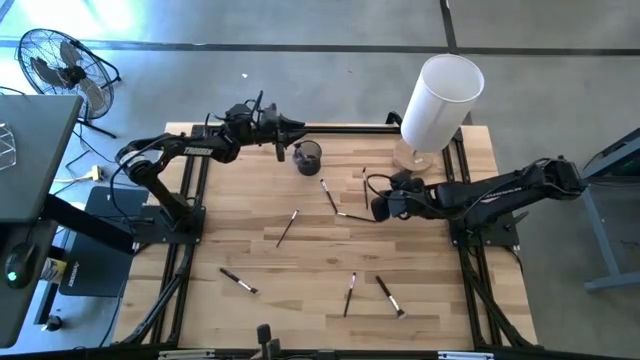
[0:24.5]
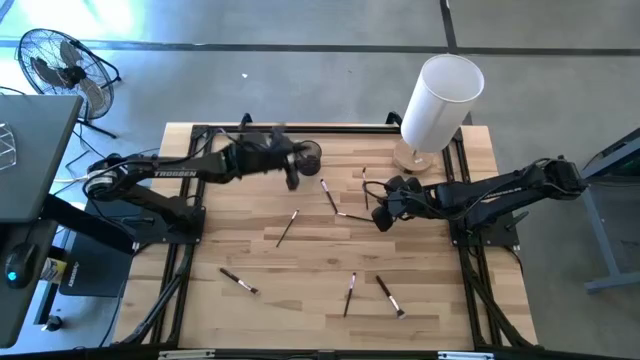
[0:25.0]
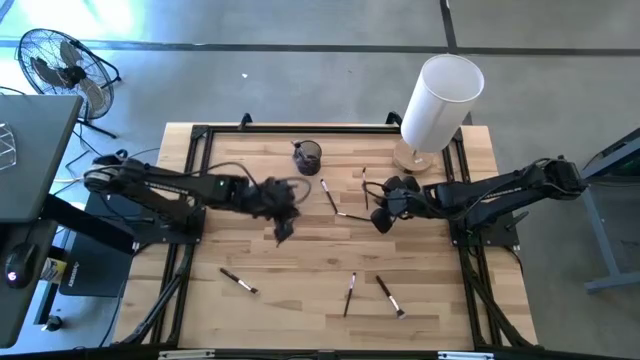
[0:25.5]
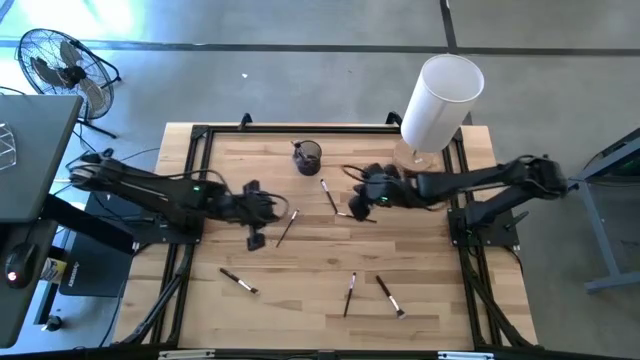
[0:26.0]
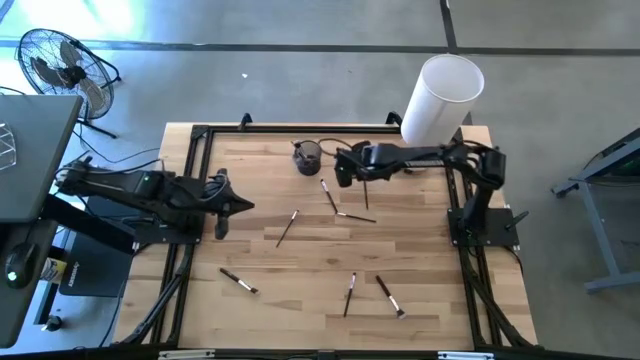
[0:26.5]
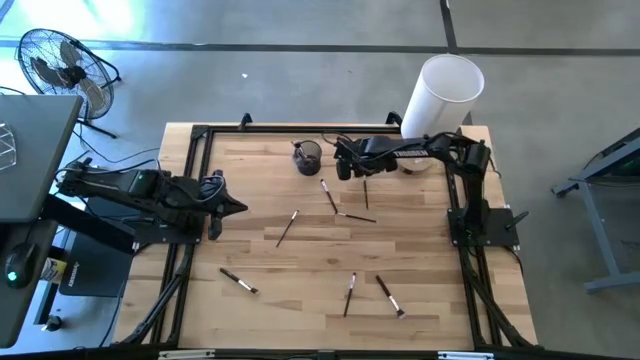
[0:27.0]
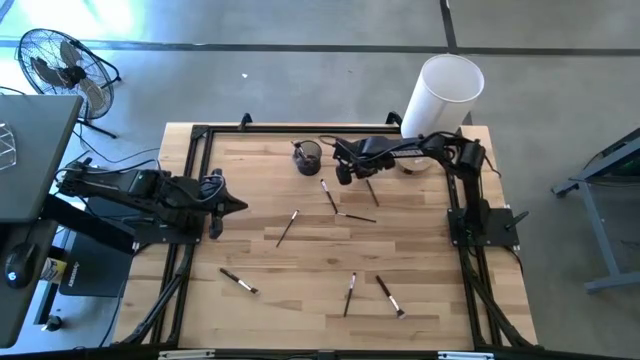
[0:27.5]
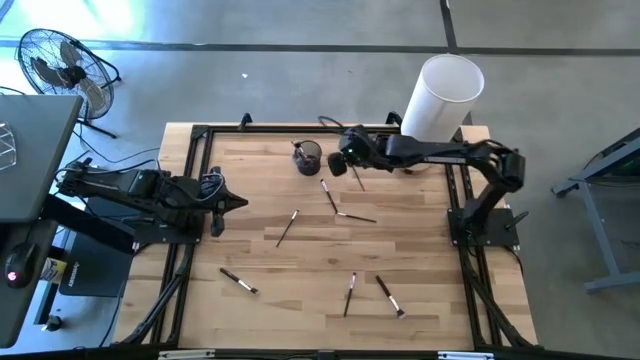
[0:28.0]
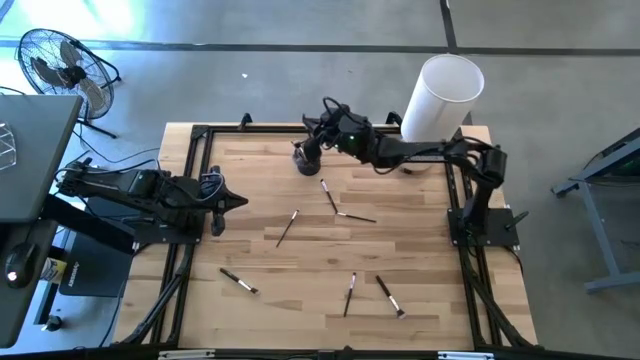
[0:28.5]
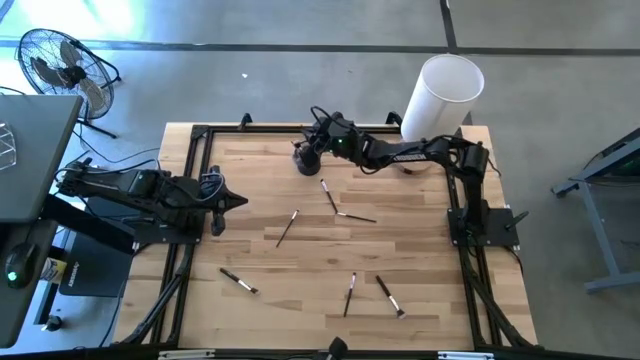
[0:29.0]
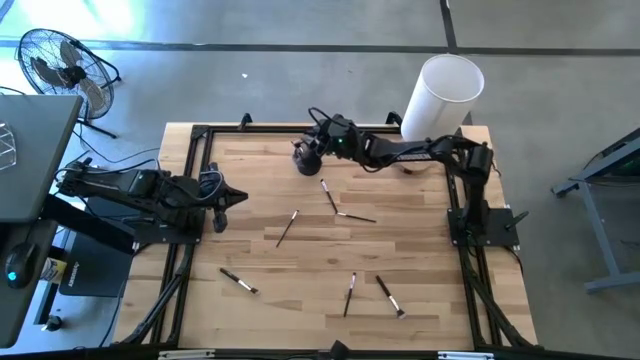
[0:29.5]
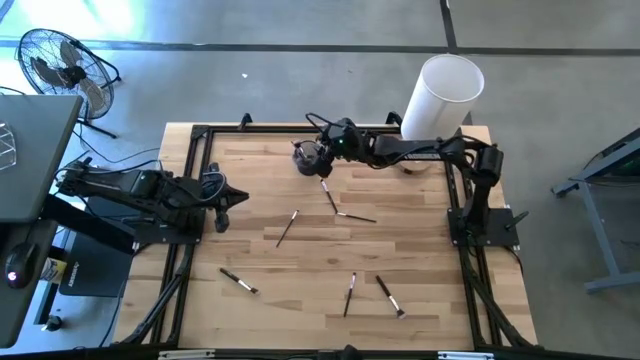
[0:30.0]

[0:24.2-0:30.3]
Task: Put items in baskets/containers
Put the brow brush into the pen holder

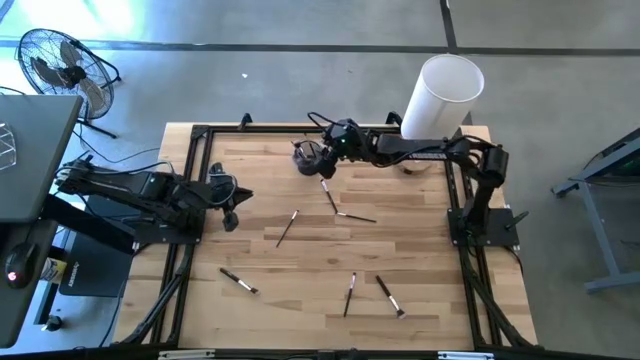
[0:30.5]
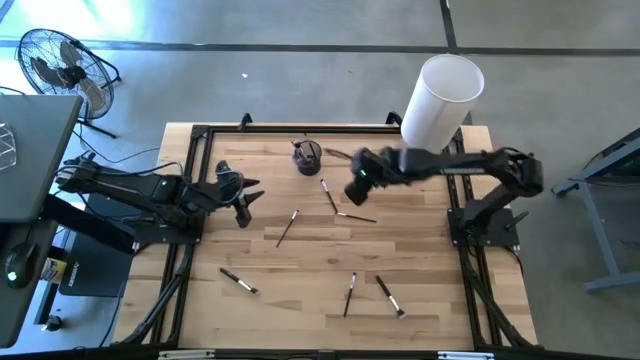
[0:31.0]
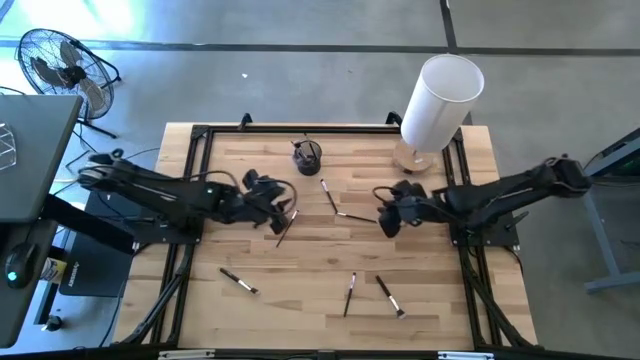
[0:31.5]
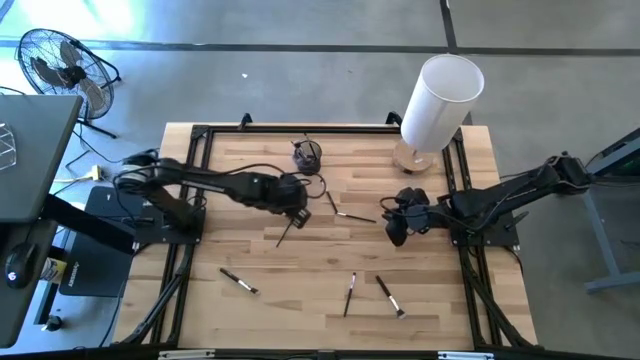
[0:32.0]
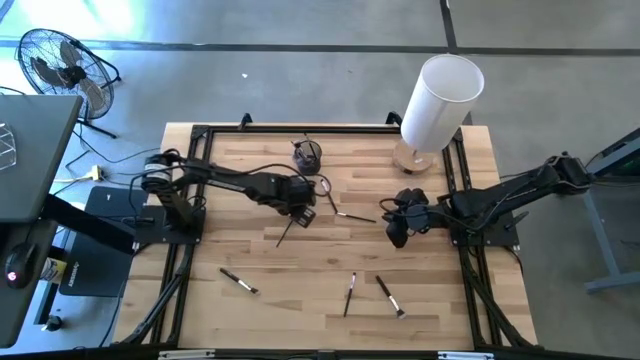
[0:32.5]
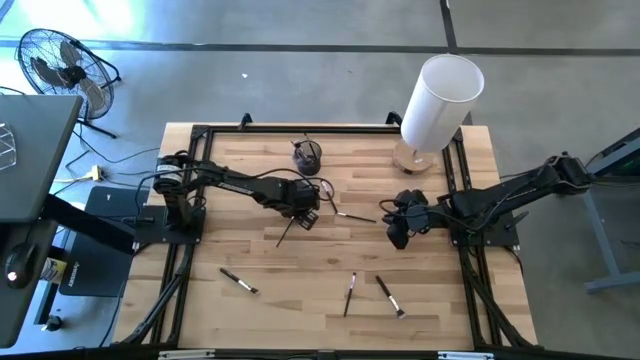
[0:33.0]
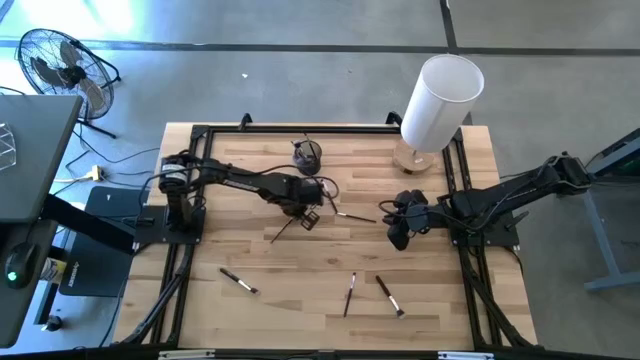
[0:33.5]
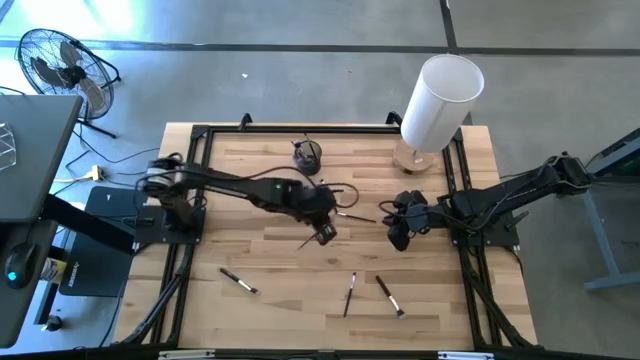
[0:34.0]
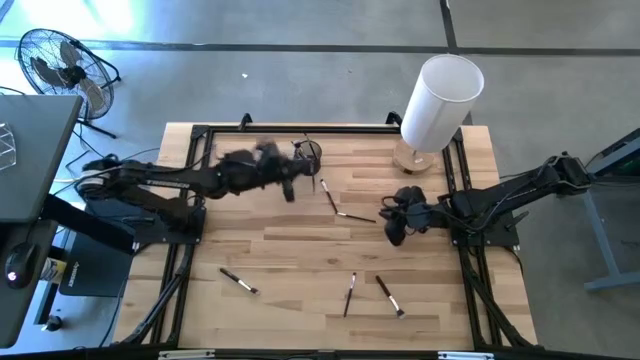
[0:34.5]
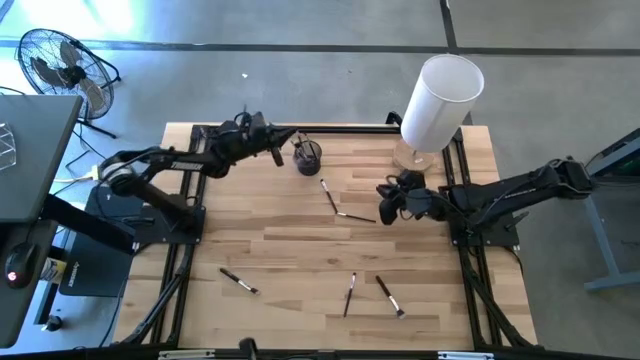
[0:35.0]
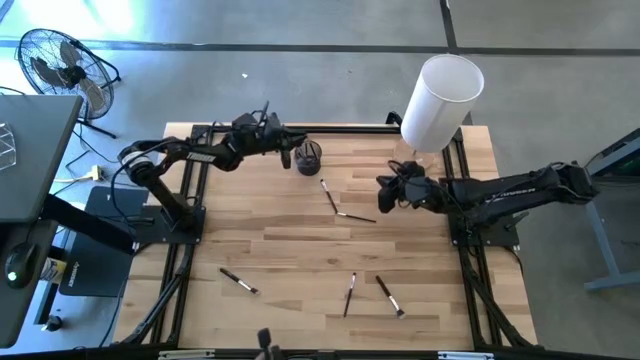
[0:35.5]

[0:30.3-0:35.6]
Put the eyeshadow brush into the pen holder

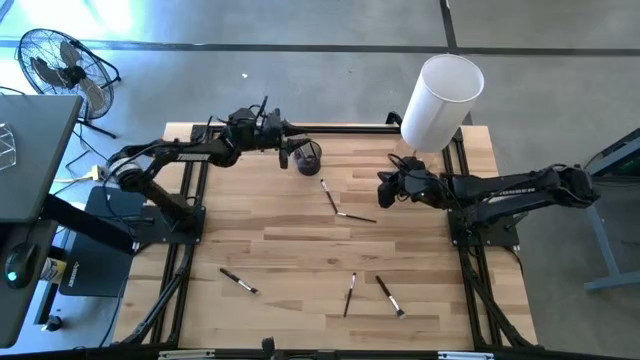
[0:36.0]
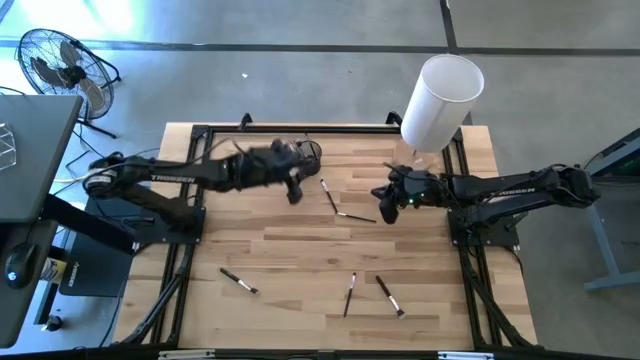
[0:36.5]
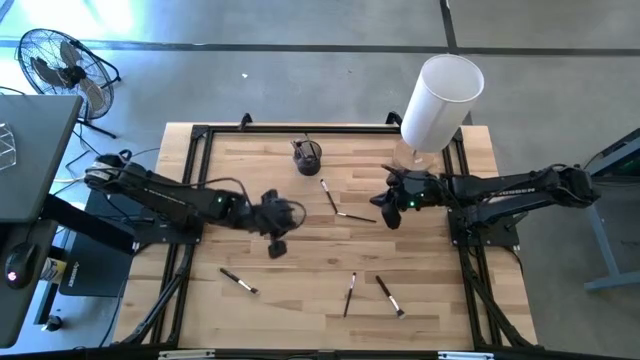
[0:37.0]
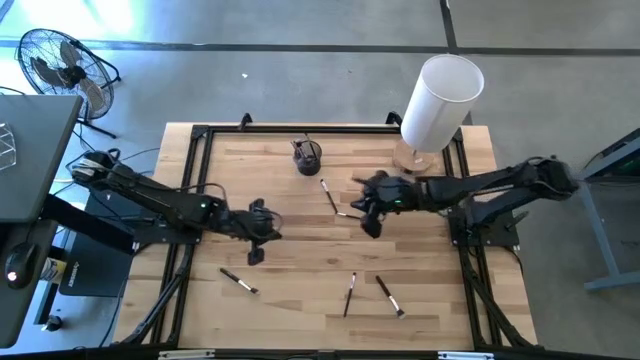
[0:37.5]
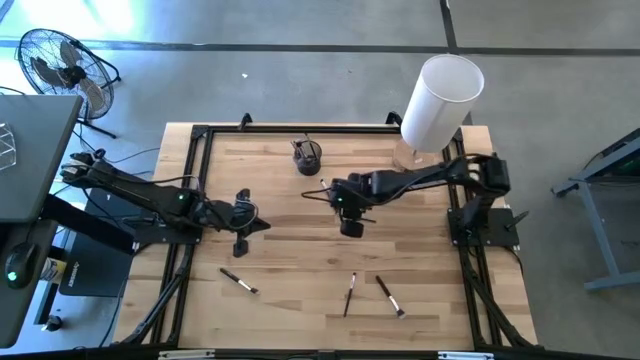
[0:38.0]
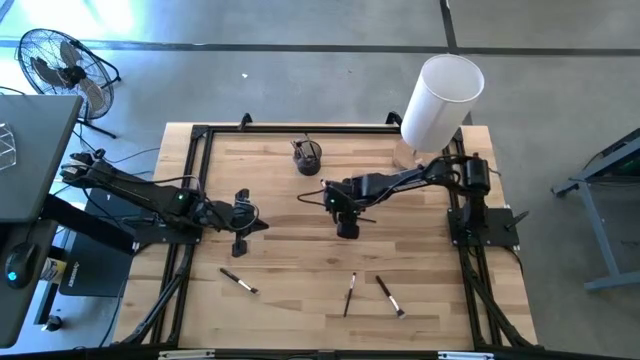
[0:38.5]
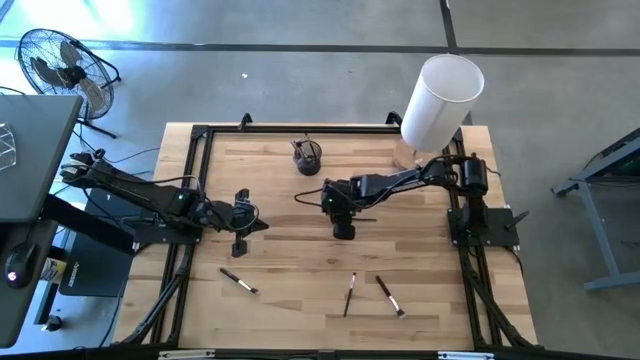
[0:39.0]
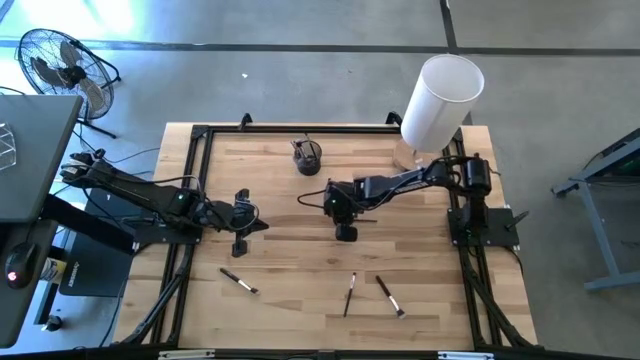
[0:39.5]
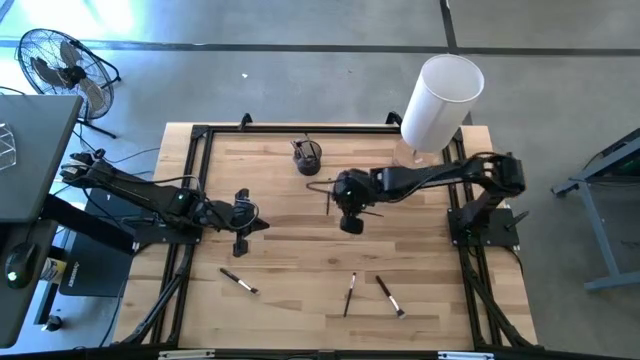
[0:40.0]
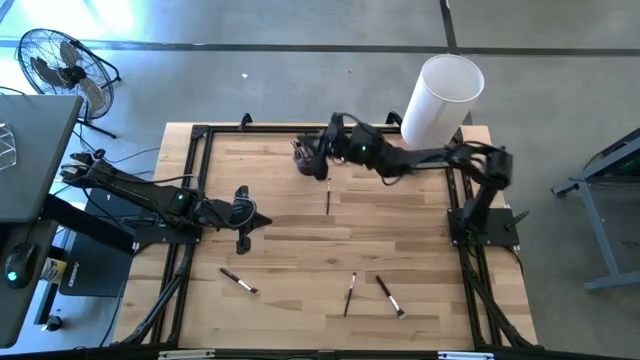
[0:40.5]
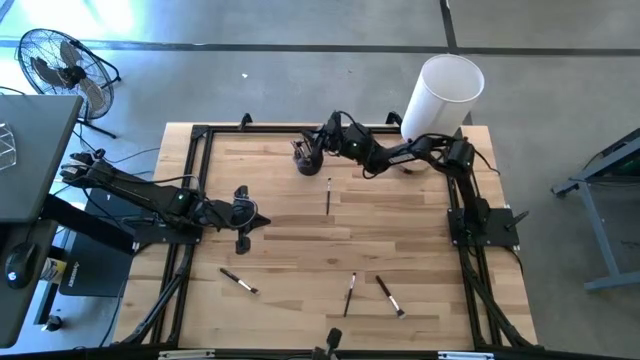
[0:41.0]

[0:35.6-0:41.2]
Put the eyeshadow brush into the pen holder

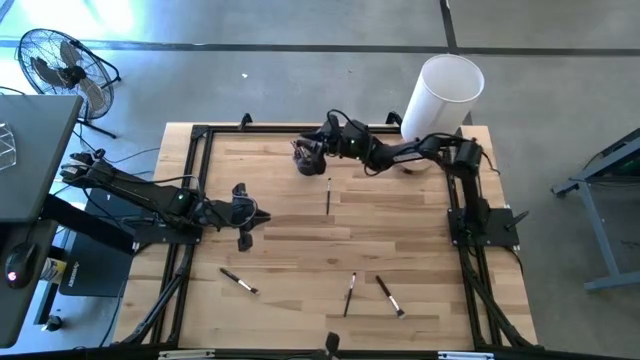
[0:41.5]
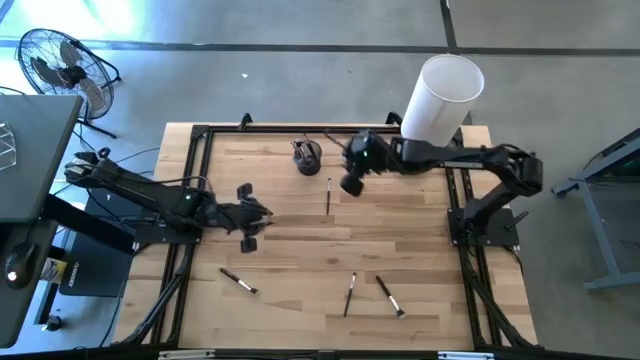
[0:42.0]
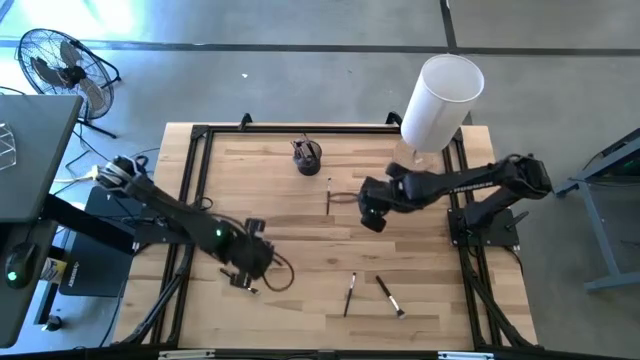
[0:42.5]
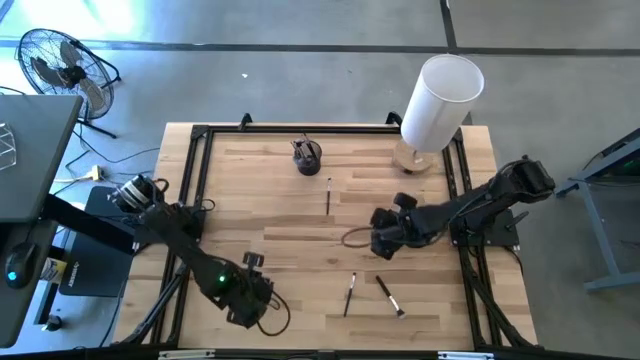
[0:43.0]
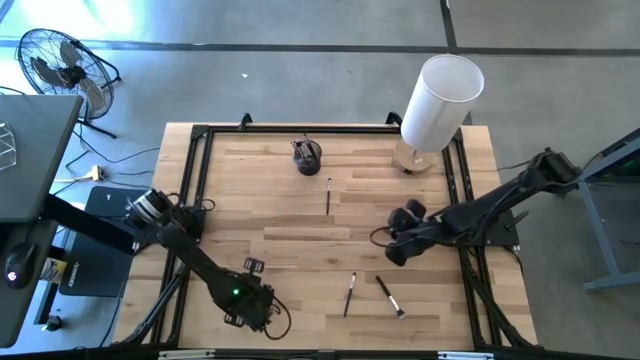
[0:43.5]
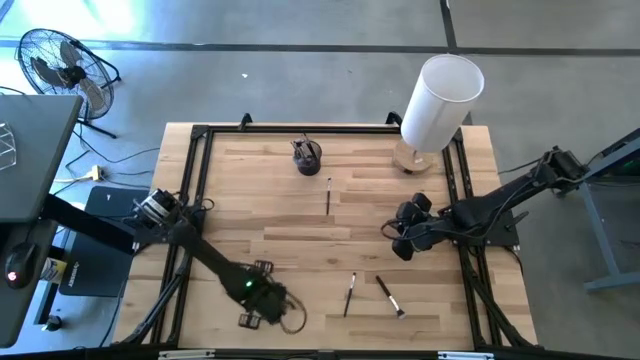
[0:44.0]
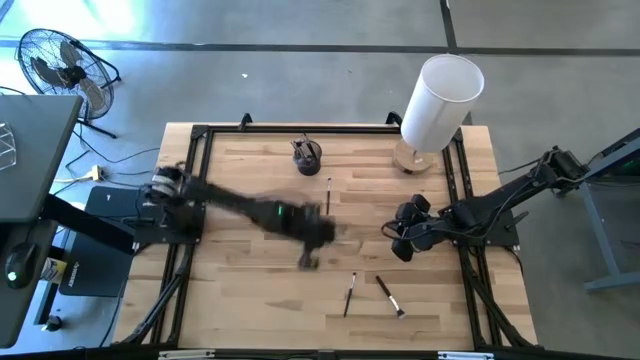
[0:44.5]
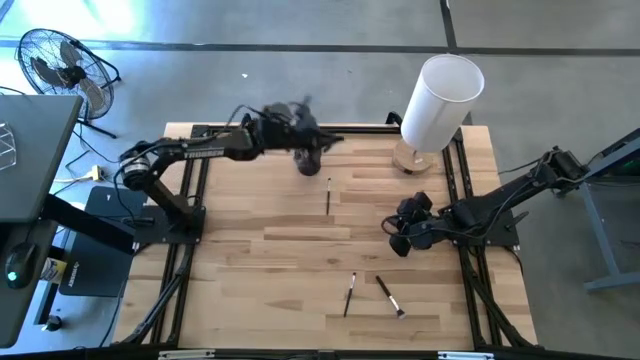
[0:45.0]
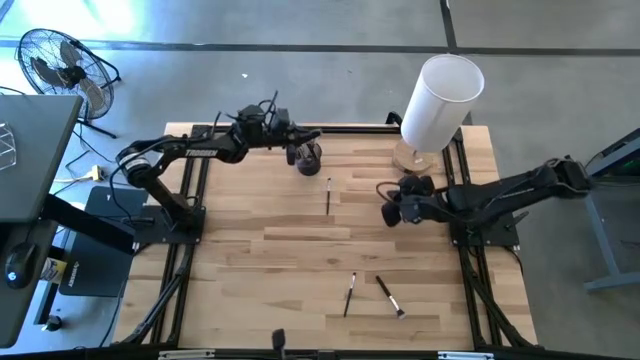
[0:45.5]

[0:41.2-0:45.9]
Put the powder brush into the pen holder
